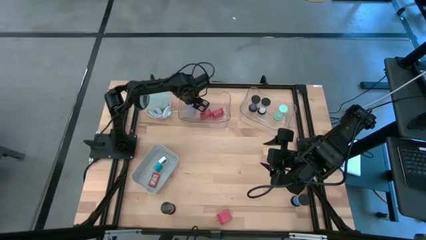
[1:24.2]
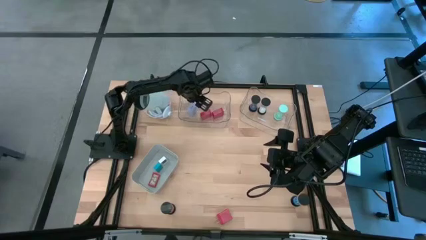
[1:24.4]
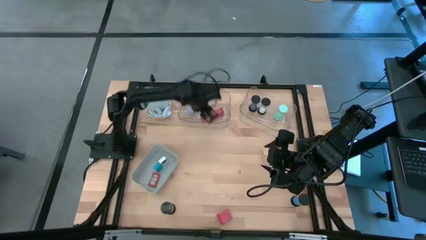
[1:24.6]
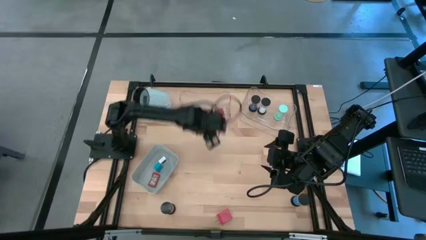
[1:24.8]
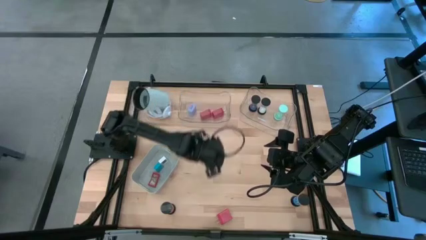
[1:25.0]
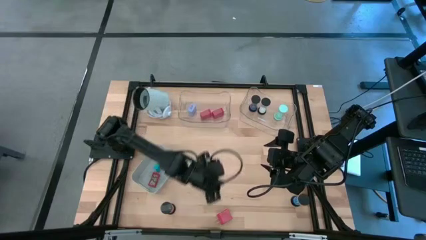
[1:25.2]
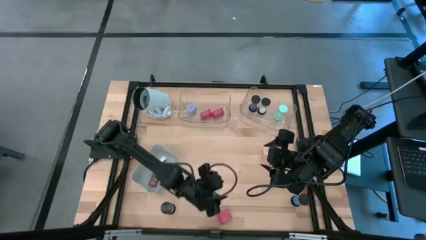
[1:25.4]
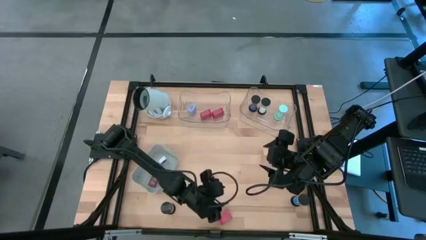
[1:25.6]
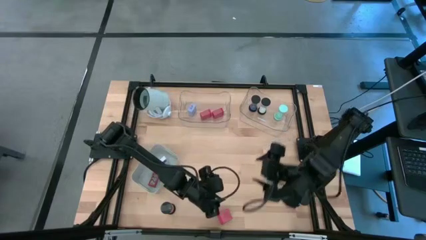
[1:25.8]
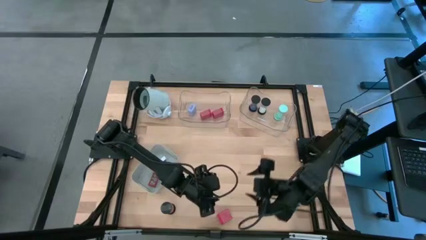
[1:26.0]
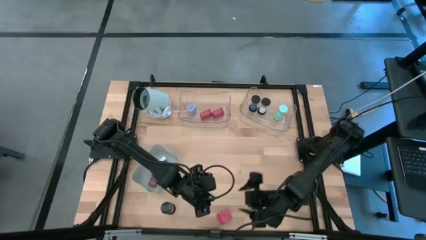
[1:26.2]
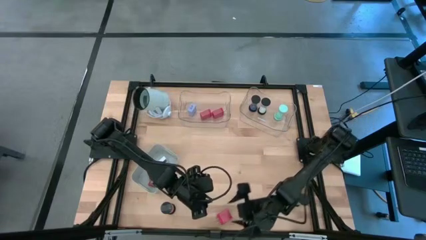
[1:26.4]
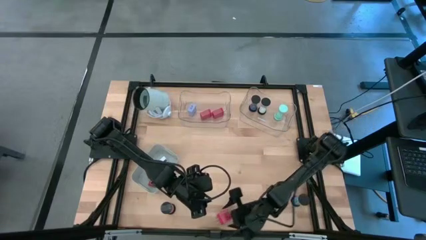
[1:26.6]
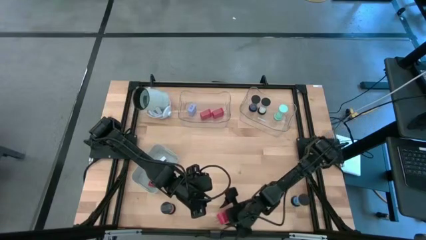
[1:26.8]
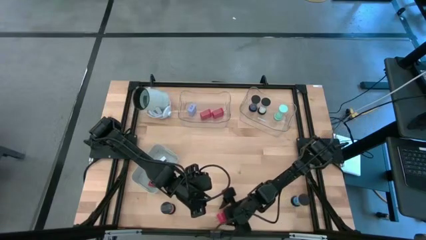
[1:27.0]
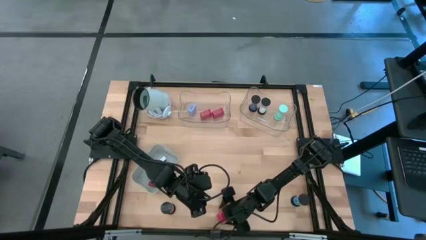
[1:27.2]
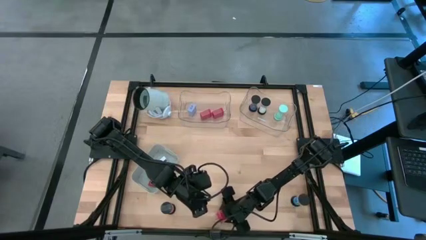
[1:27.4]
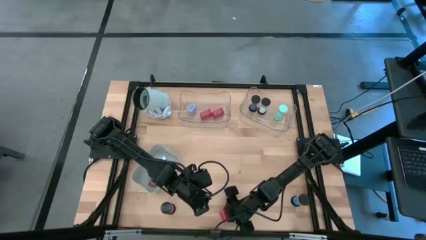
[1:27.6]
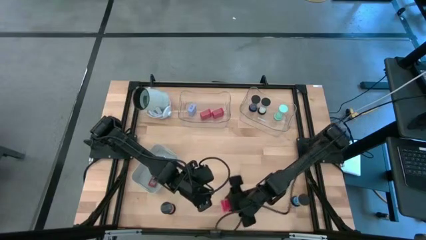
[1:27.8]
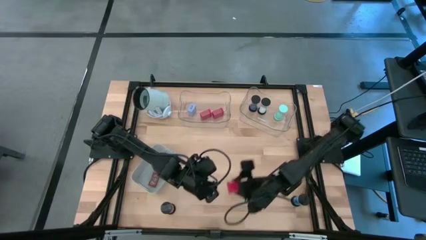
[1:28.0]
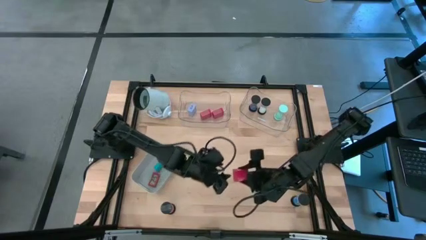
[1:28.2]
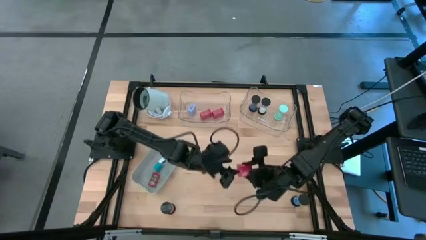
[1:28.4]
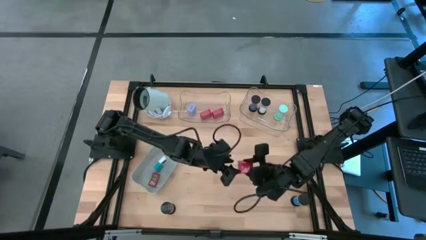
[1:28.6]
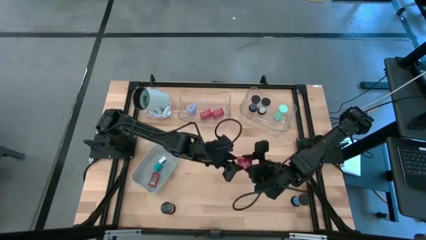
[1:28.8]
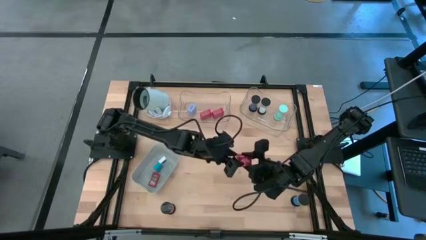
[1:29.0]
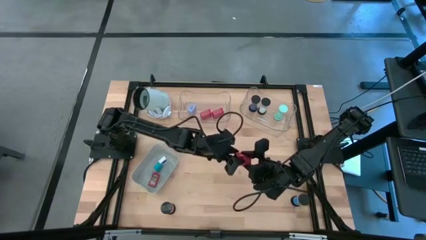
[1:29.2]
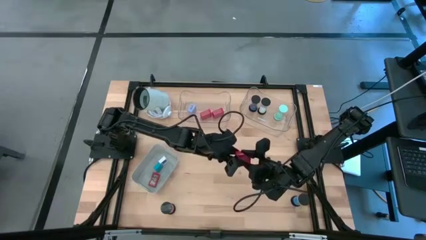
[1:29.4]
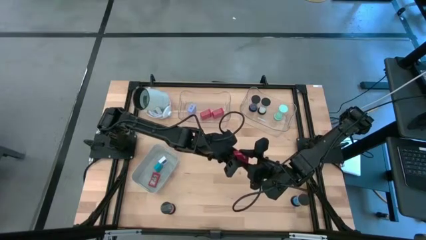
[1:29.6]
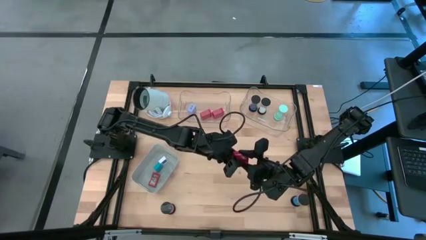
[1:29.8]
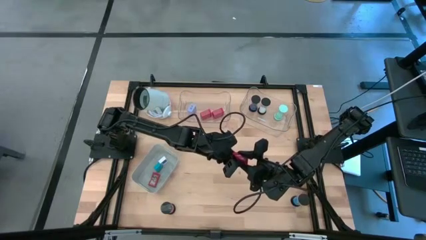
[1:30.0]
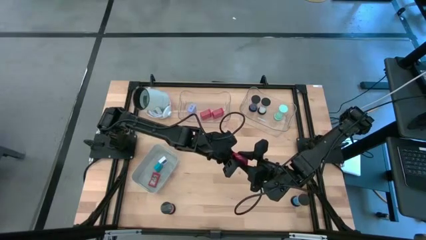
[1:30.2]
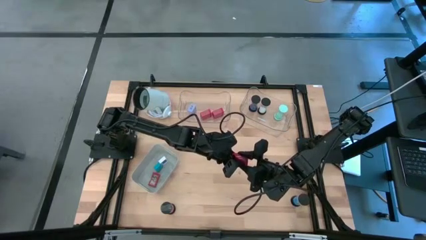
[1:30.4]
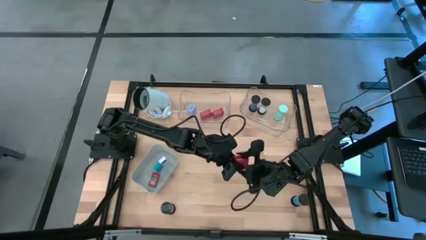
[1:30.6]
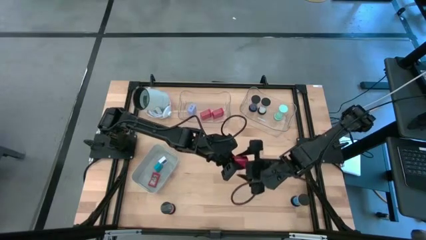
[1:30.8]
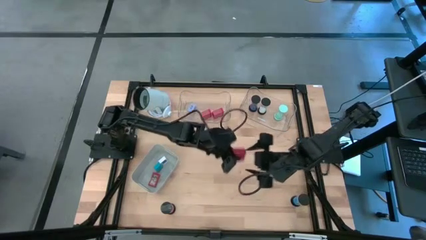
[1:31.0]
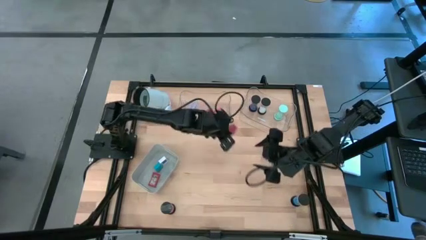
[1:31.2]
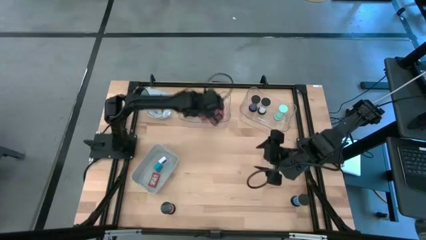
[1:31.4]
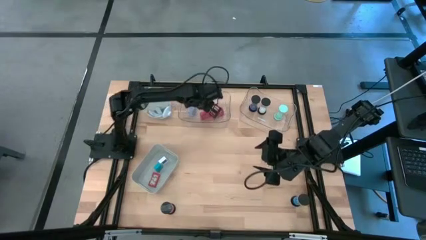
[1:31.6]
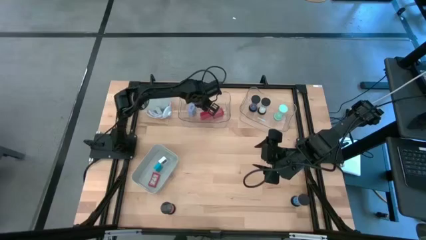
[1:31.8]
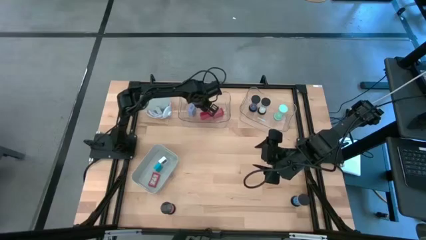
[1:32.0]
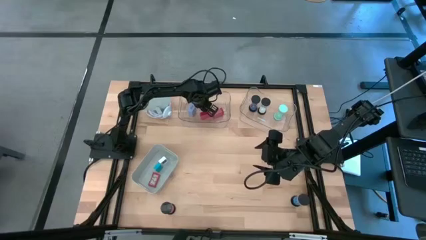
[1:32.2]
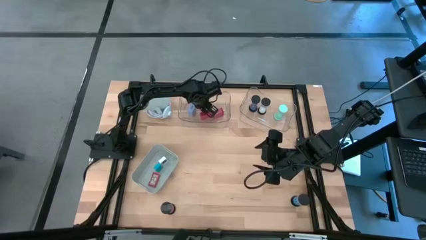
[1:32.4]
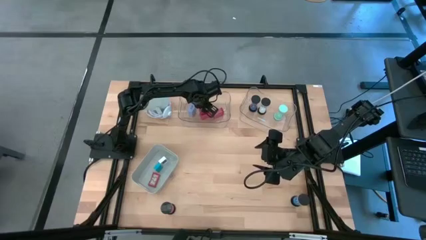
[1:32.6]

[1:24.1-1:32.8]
Task: Pick & Place Office items
Put the red charger adapter into the left transparent bin

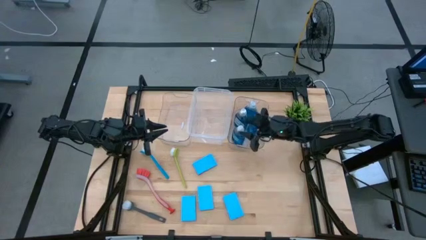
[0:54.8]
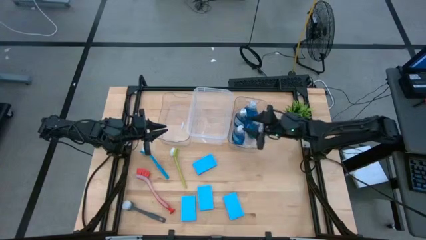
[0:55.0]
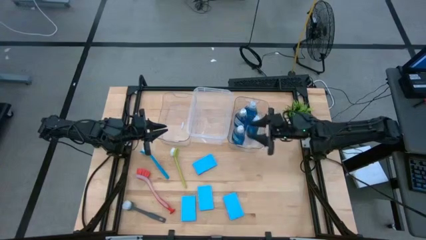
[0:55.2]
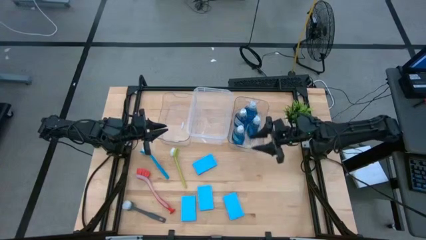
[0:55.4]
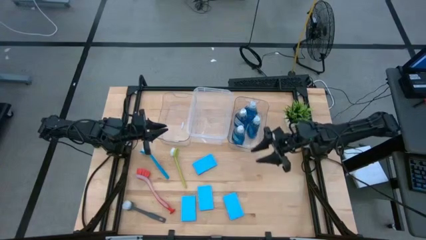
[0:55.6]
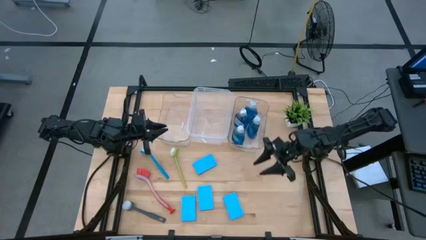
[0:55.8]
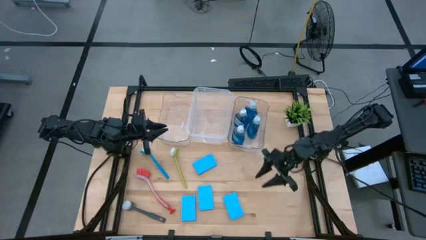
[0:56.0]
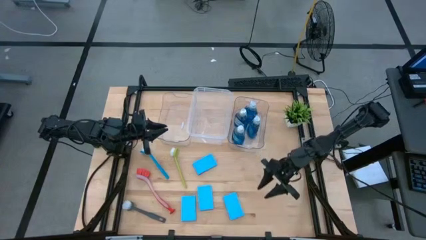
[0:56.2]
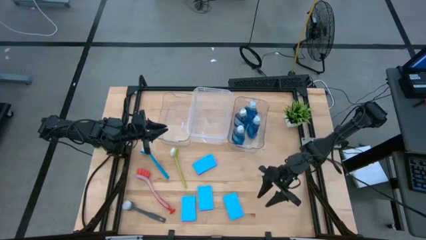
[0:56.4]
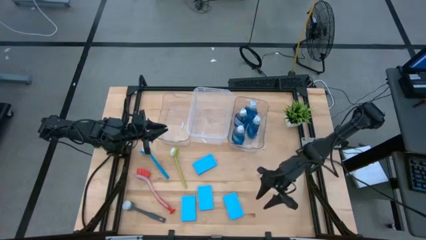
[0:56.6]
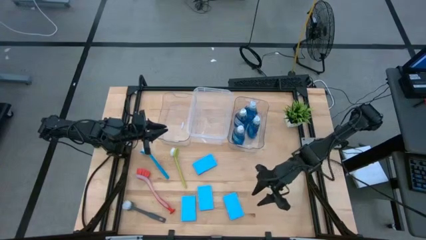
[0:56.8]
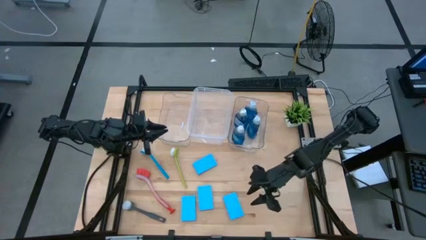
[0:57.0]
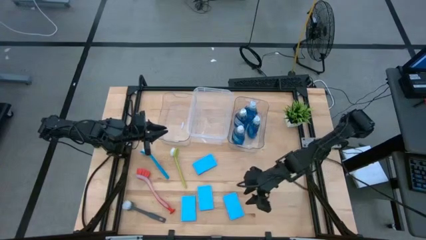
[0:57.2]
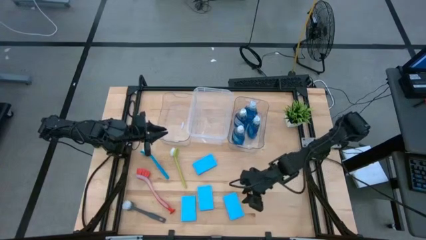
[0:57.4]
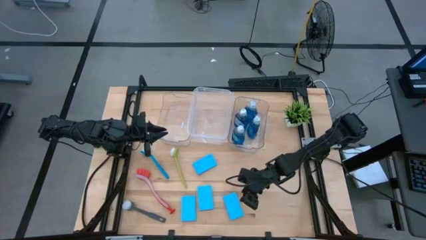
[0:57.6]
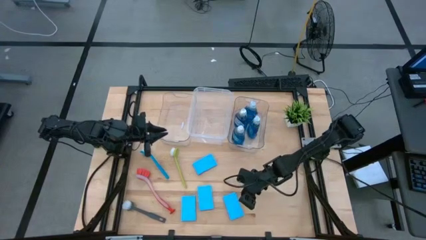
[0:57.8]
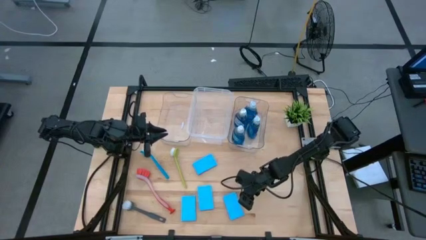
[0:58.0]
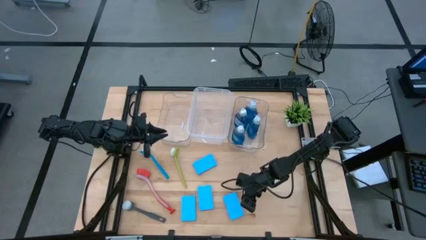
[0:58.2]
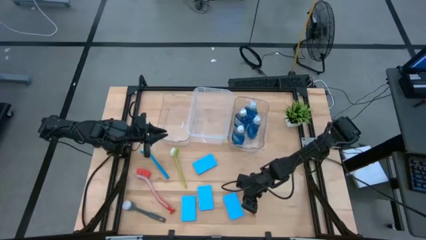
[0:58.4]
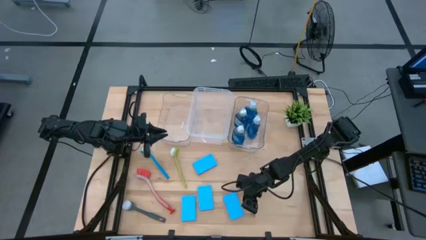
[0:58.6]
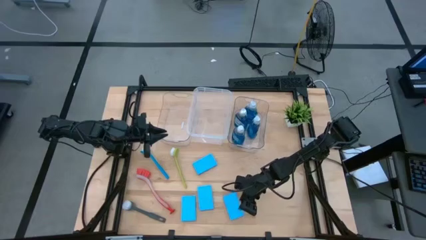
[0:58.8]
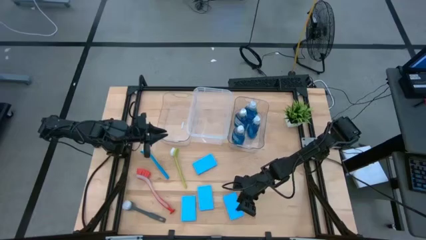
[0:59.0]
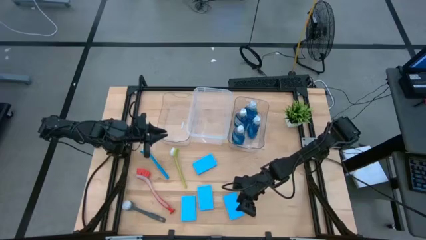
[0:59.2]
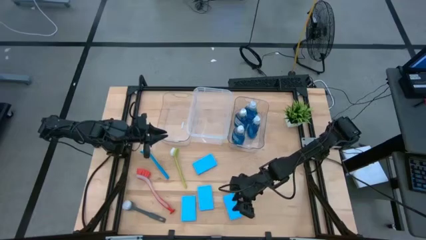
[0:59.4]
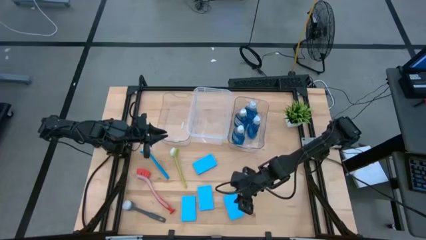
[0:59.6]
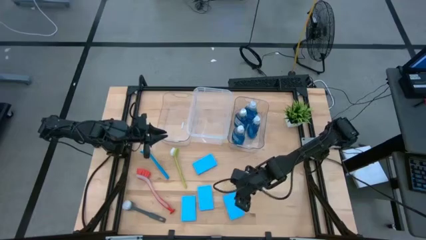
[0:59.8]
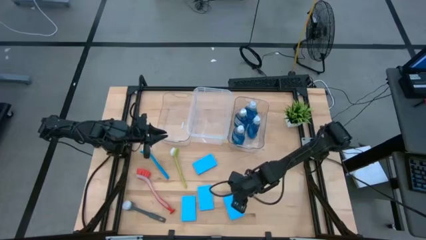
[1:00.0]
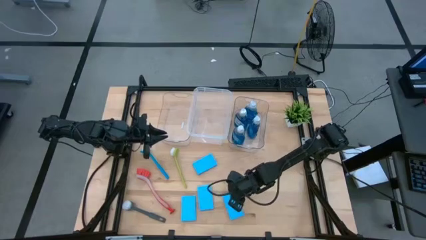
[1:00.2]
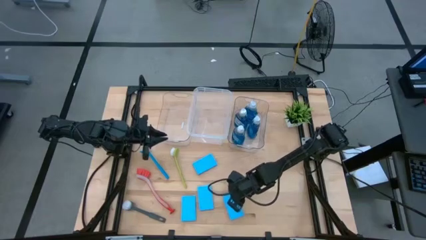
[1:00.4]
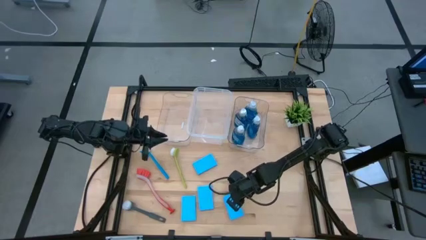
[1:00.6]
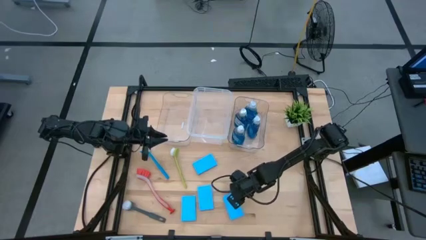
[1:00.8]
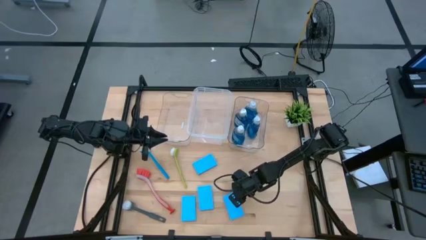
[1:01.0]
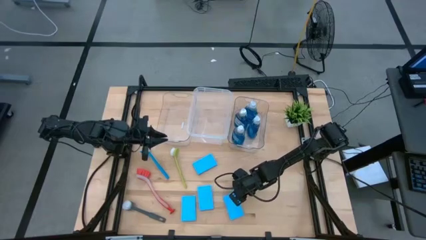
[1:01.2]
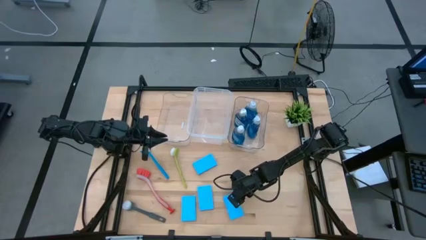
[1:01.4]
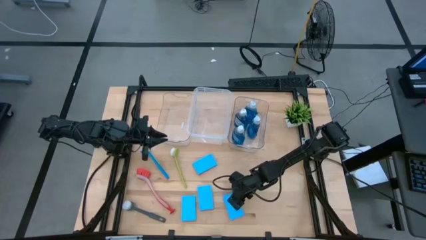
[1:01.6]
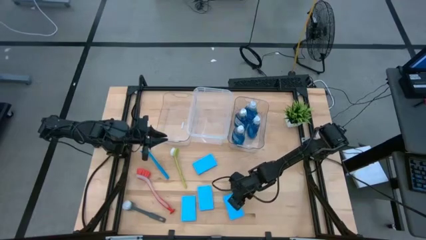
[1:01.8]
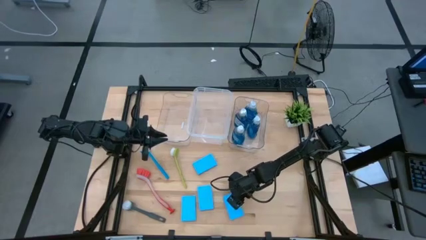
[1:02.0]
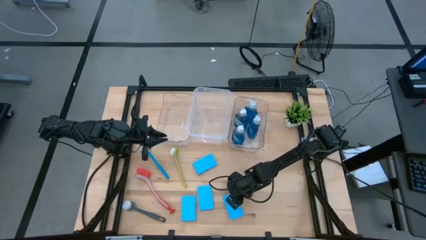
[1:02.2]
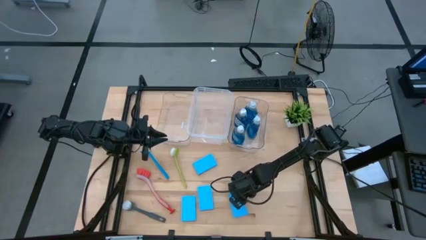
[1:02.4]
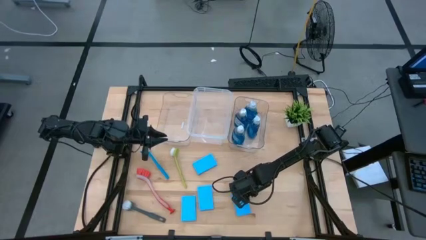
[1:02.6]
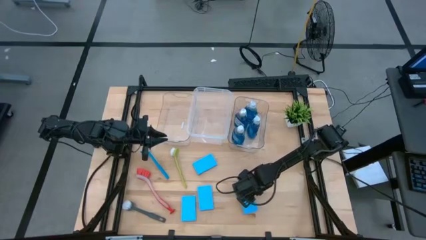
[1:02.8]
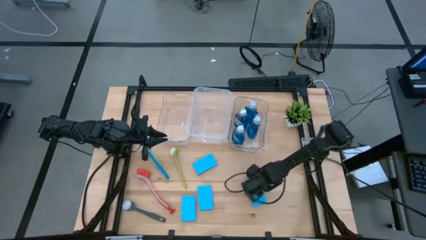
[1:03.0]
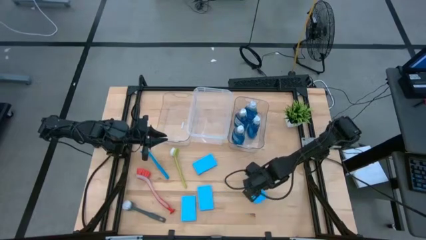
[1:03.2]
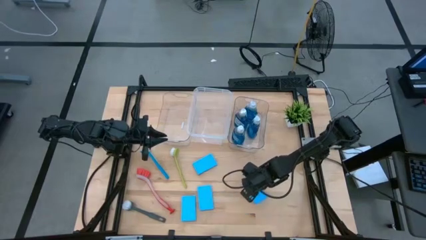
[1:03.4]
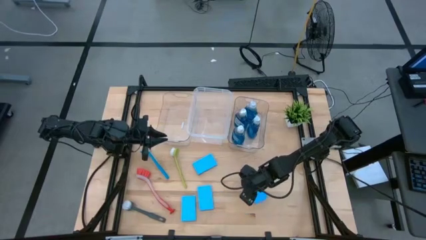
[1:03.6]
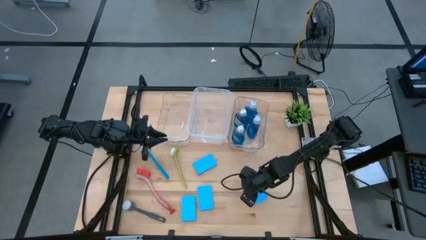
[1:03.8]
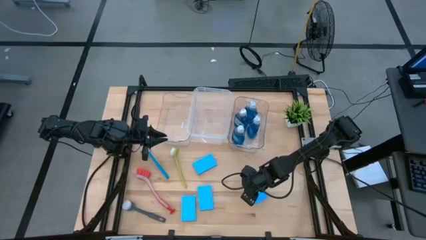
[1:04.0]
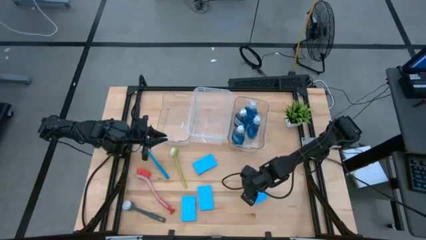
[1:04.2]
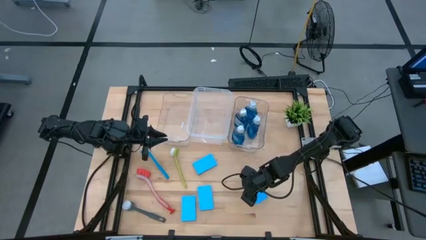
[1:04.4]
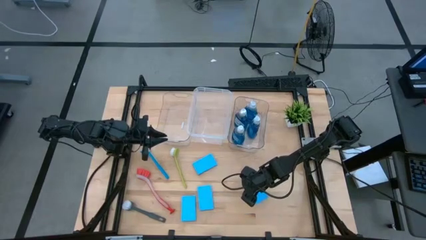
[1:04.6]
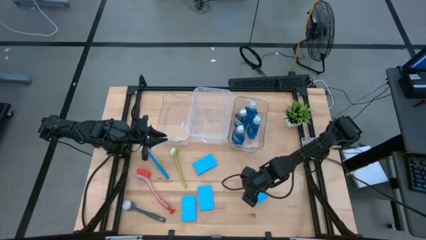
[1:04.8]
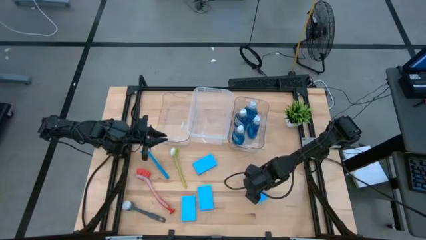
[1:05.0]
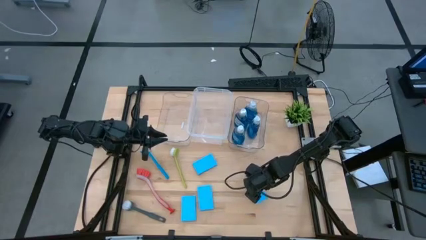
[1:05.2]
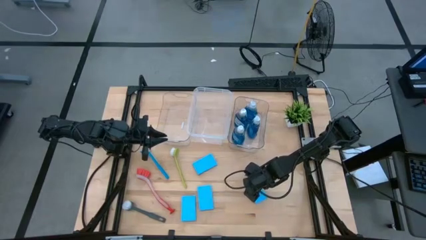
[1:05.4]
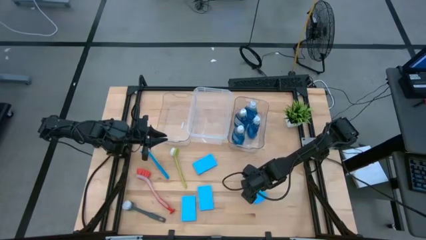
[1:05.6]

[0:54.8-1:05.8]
Task: Pick & Place Kitchen Sink Supplies
Put the blue sponge into the left transparent bin
